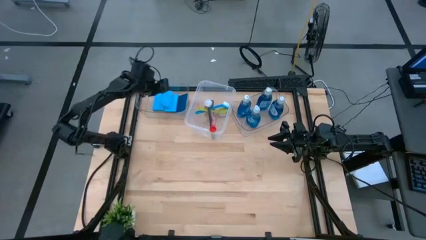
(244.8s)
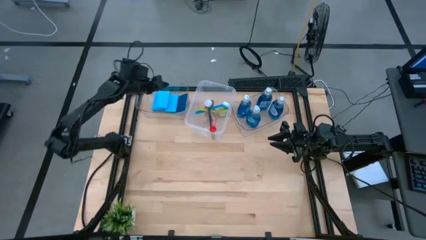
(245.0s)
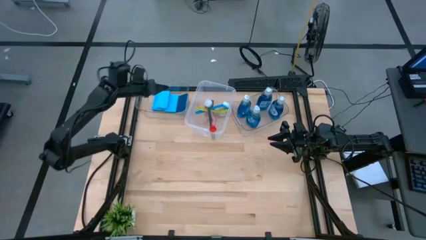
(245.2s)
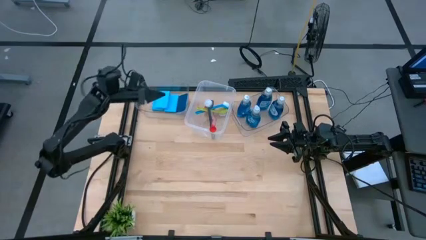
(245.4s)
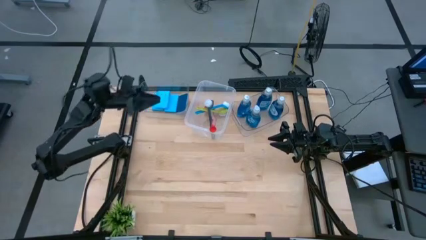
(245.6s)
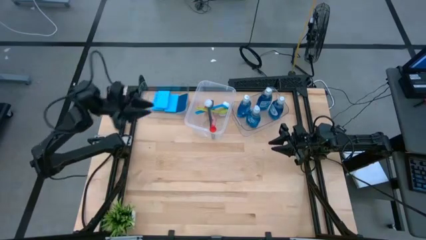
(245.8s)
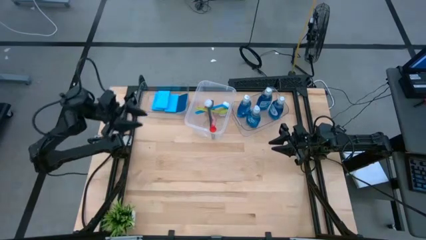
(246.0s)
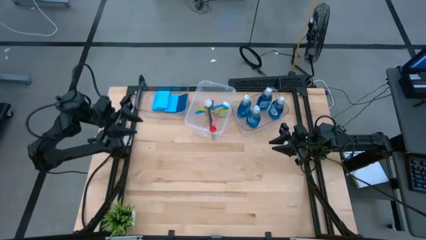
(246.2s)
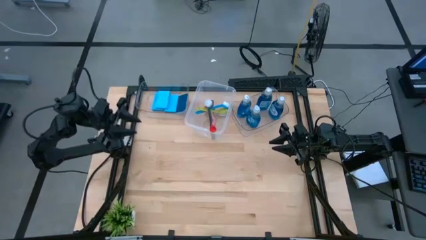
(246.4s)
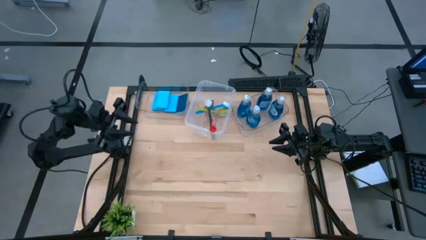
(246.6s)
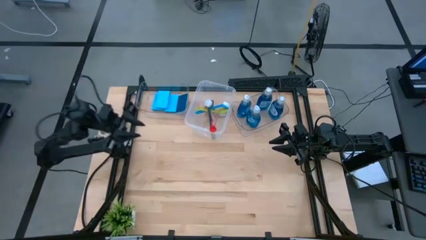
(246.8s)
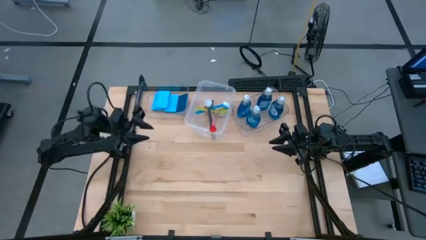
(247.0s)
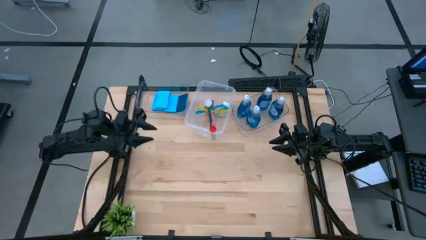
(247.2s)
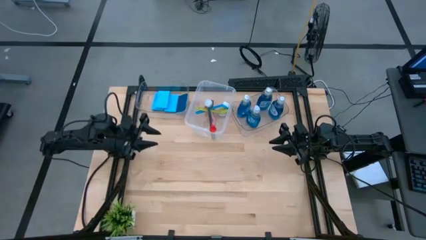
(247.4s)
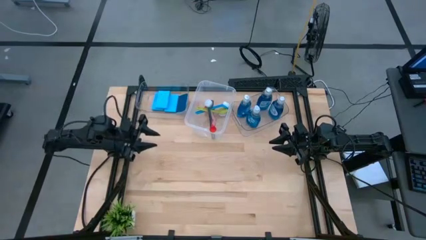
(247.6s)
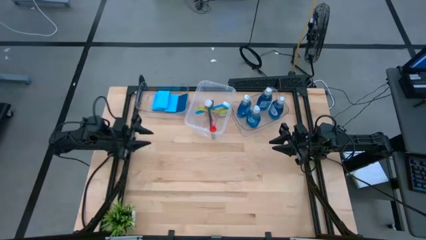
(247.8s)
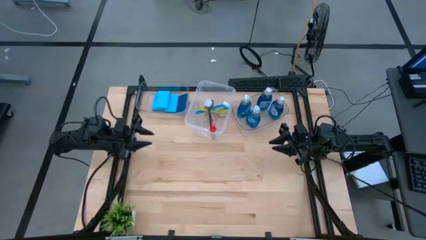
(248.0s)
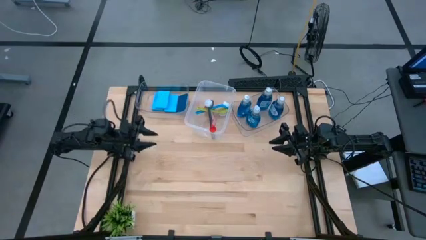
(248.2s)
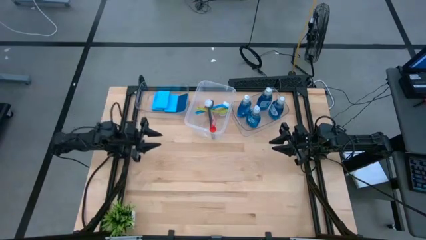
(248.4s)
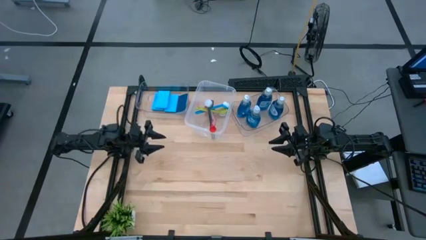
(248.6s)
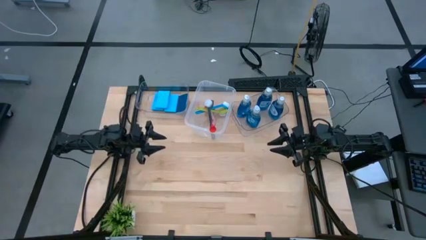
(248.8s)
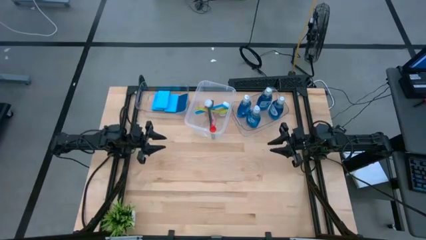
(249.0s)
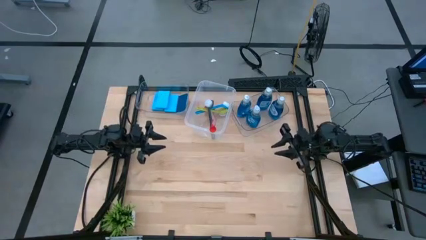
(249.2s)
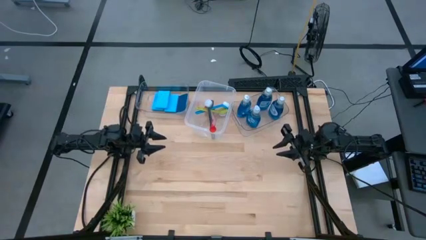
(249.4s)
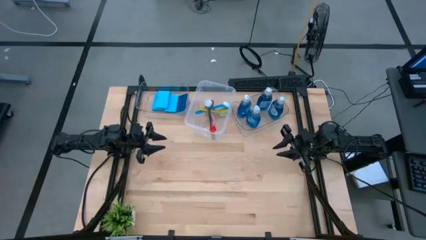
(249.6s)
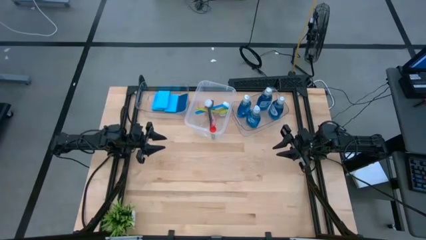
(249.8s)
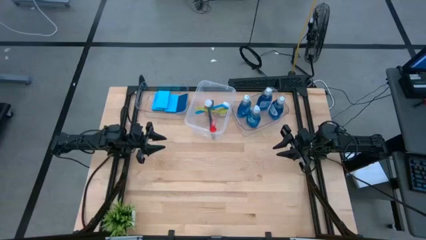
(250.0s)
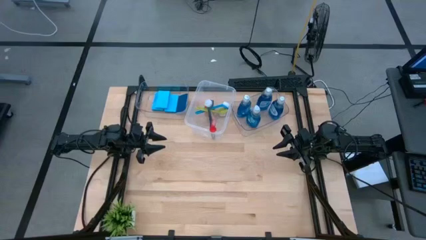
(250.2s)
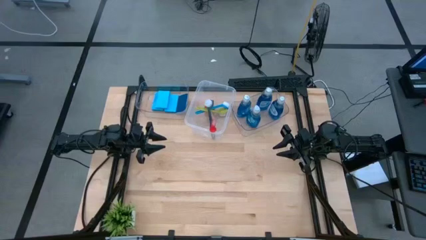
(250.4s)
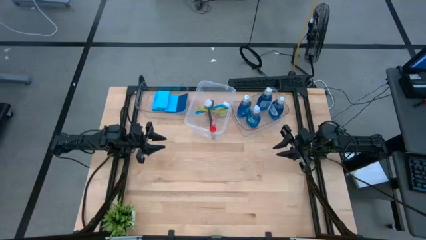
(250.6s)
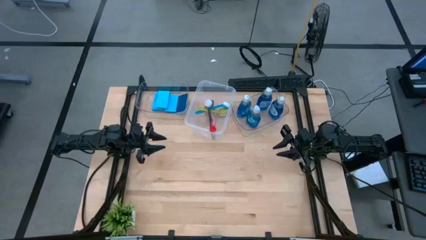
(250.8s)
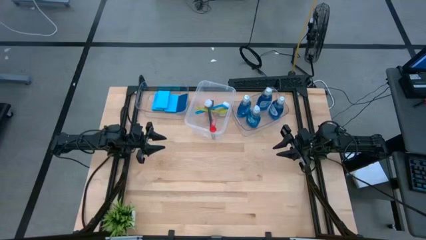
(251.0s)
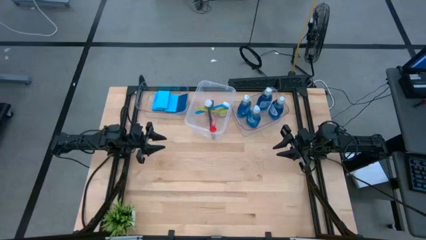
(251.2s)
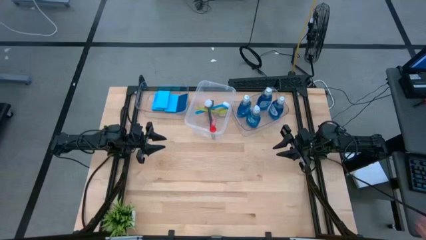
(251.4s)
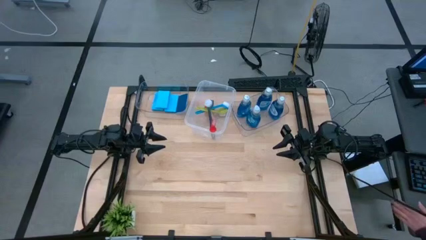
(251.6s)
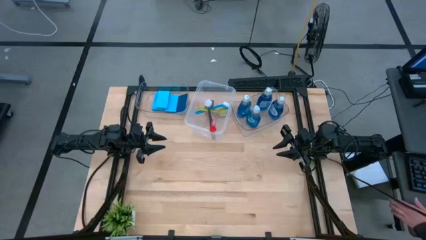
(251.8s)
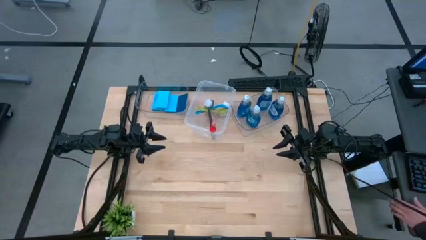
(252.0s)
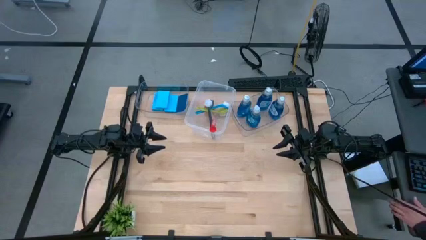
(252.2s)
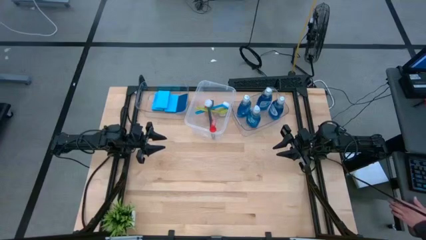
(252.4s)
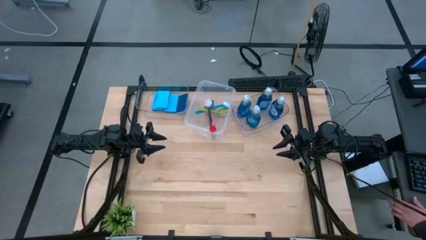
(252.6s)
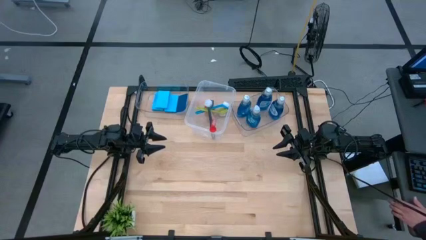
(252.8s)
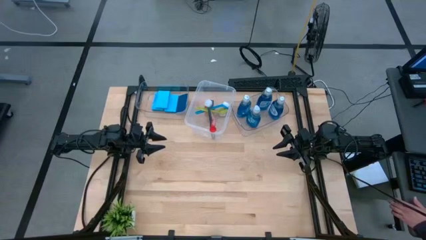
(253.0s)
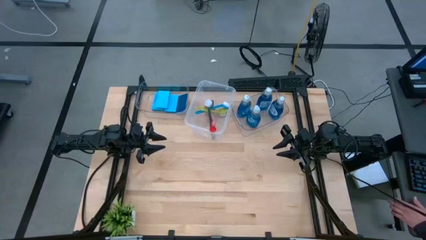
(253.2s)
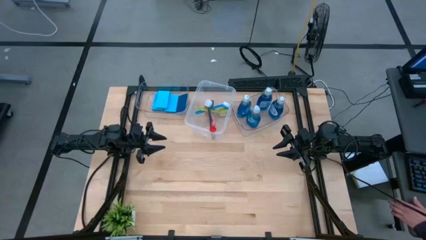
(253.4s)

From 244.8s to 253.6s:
Task: Pick & Place Kitchen Sink Supplies
Return to Home Position

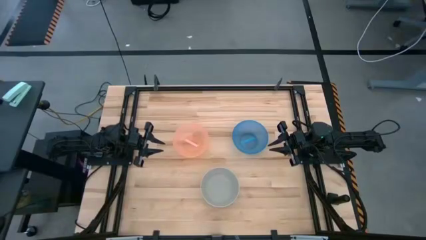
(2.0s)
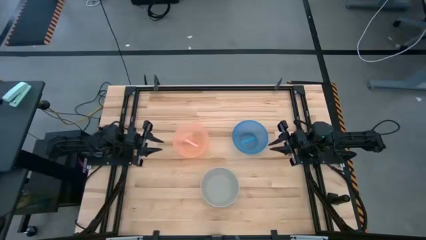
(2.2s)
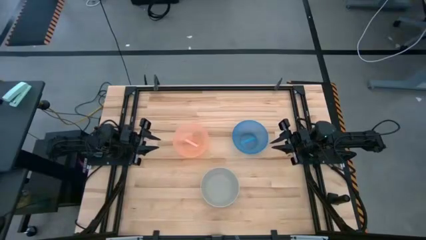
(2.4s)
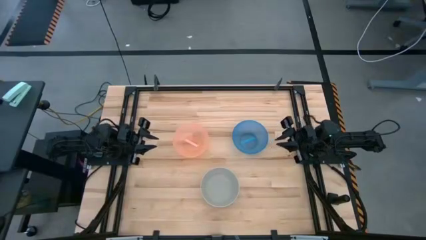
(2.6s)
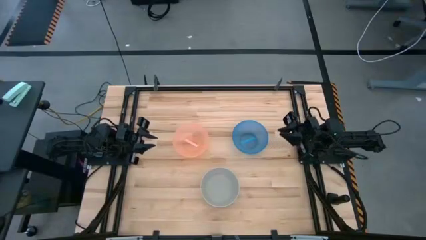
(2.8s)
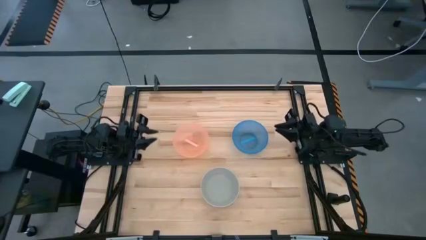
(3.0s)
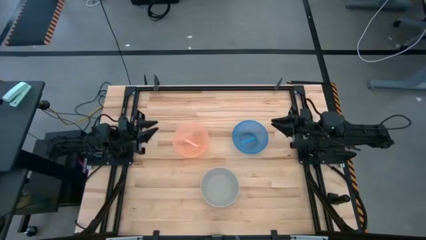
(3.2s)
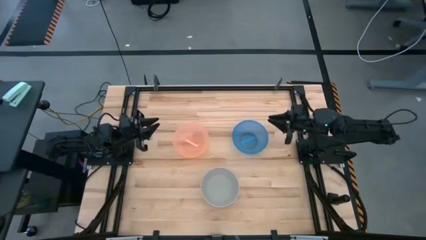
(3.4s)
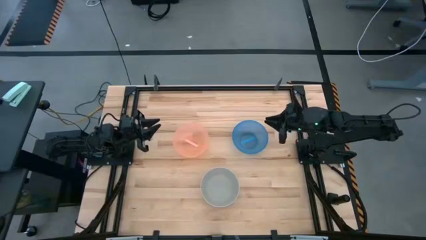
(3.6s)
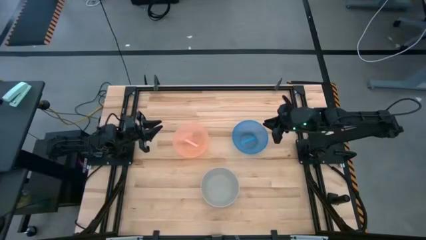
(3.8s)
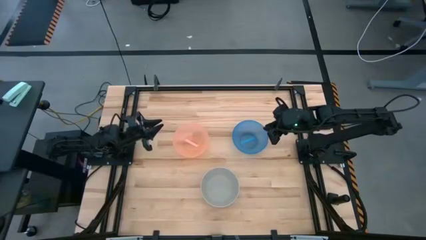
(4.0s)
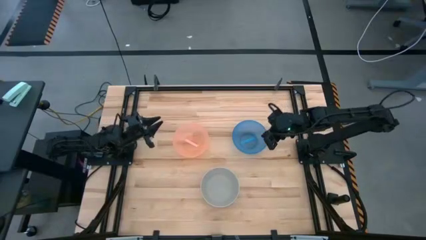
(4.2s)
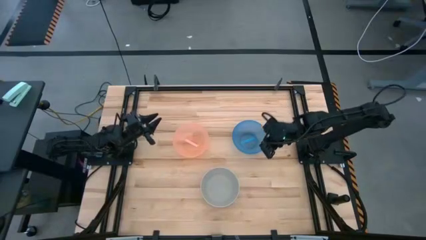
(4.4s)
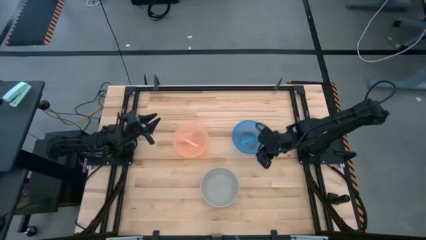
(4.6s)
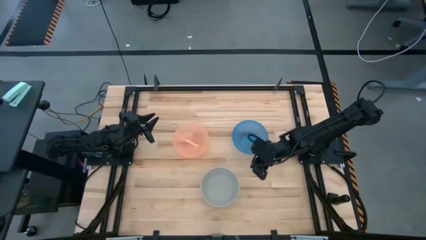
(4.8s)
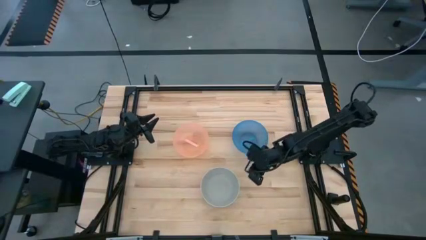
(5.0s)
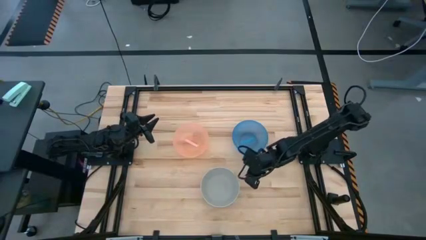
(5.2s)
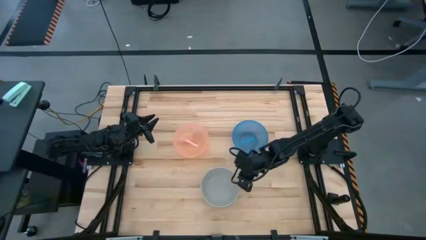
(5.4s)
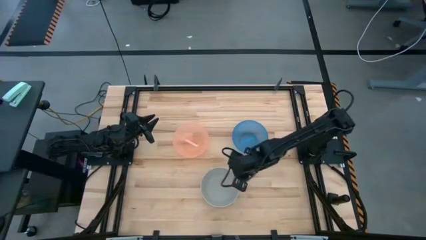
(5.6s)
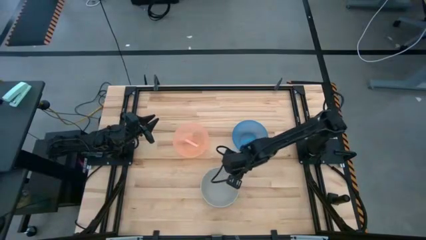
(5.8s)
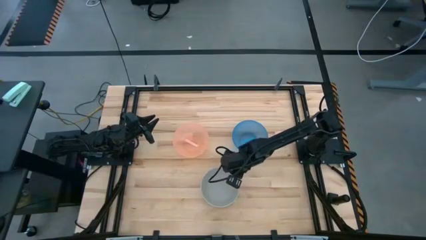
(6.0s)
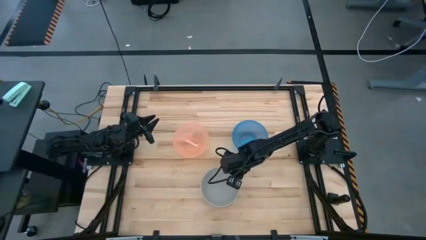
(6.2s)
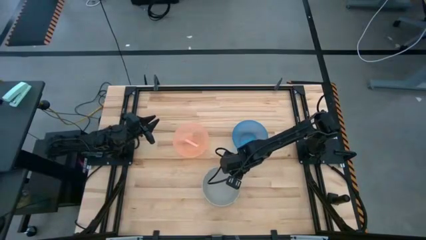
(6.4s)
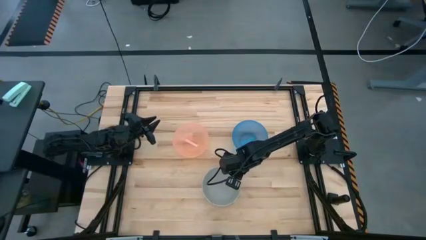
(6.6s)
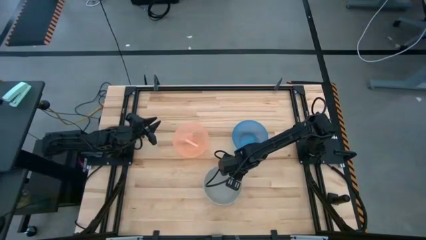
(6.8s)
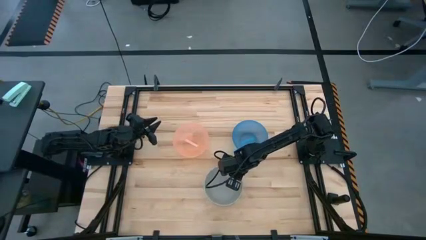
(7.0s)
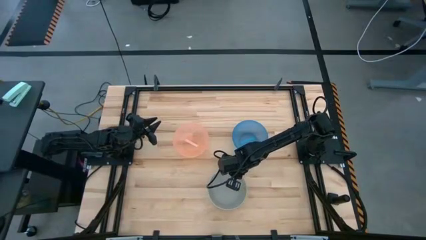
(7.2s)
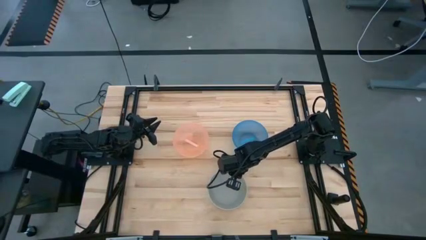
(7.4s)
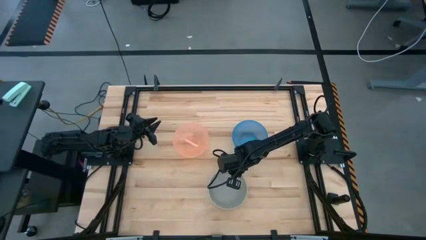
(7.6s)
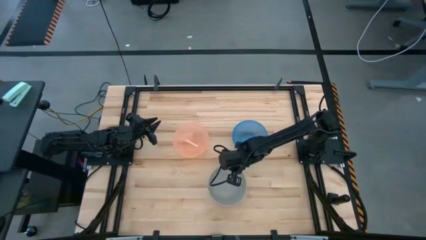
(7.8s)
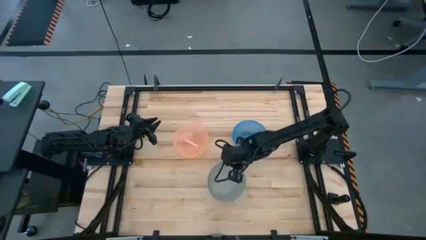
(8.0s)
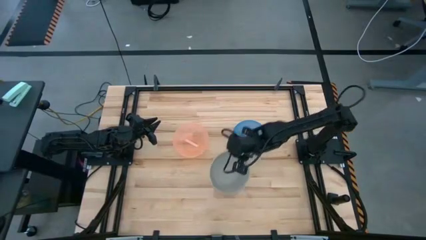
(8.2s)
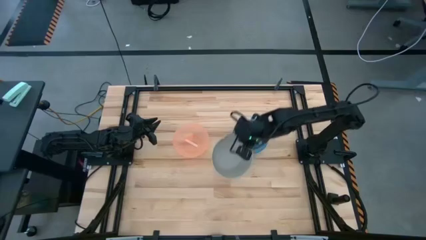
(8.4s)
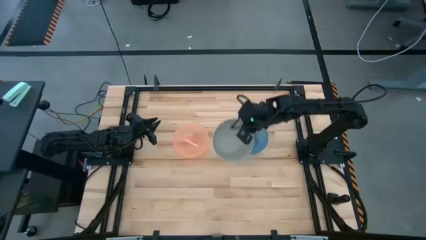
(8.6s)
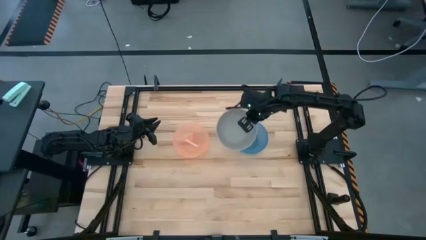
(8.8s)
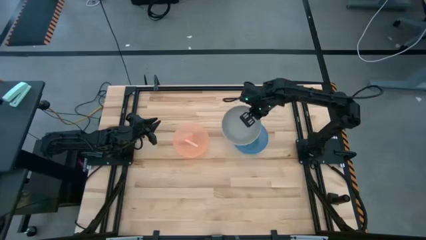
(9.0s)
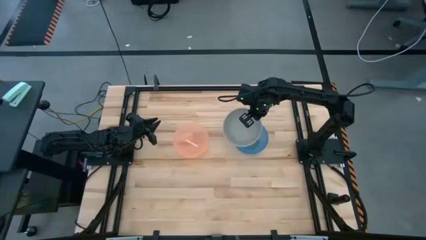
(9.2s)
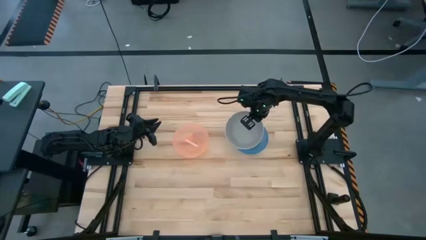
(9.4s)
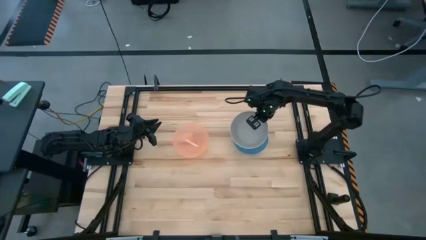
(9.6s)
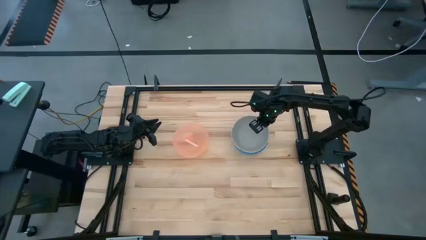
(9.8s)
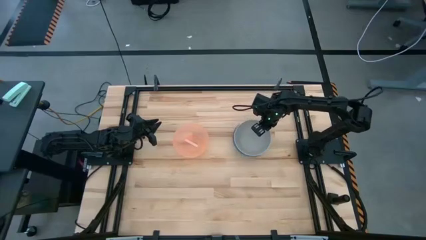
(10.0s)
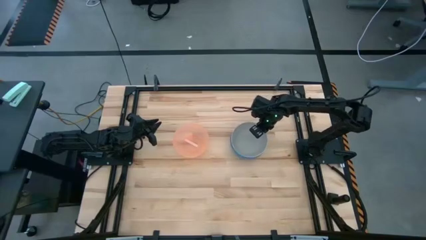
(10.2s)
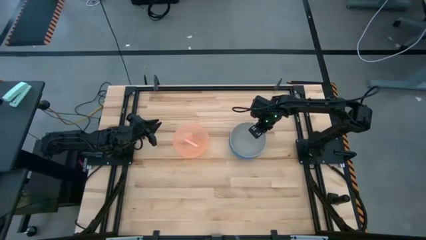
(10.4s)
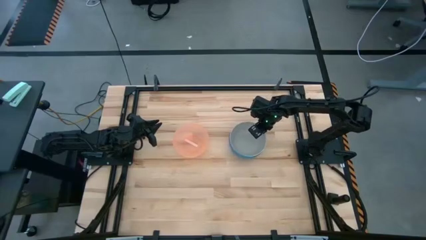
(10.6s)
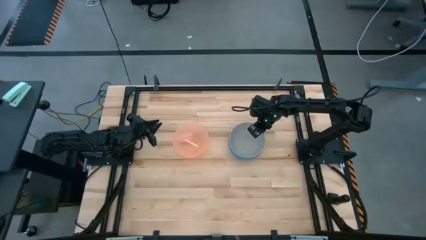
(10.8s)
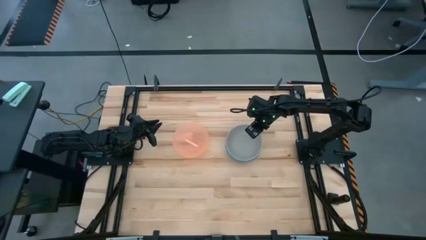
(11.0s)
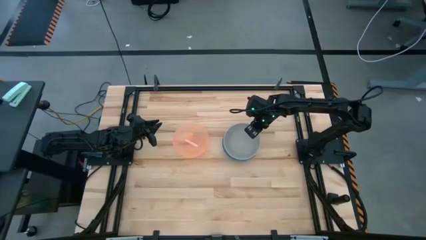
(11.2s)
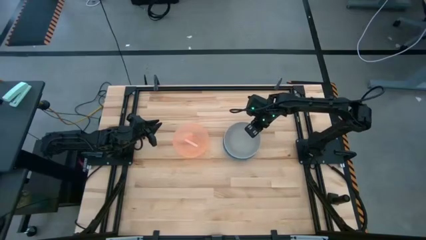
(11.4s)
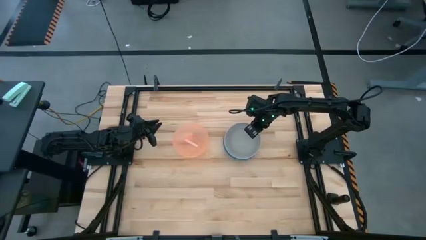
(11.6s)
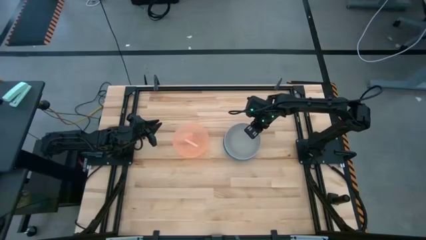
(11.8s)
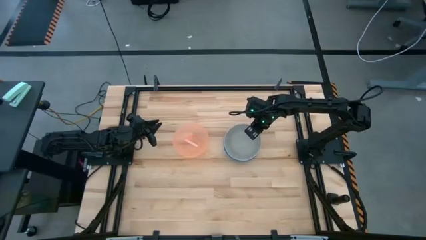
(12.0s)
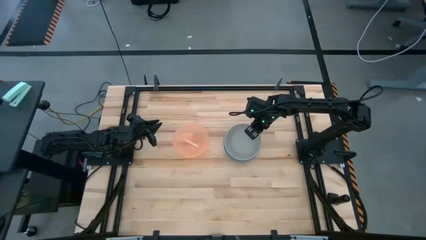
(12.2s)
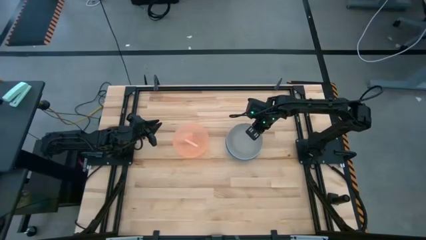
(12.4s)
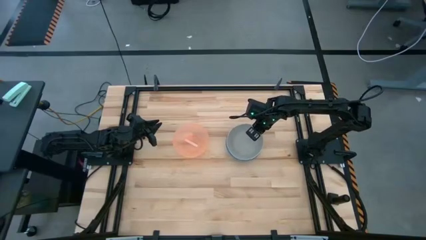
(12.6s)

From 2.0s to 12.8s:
Task: Nest bowls inside each other
Stack the gray bowl on top of the blue bowl
